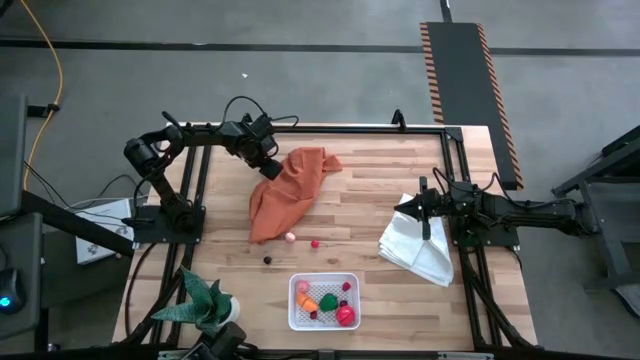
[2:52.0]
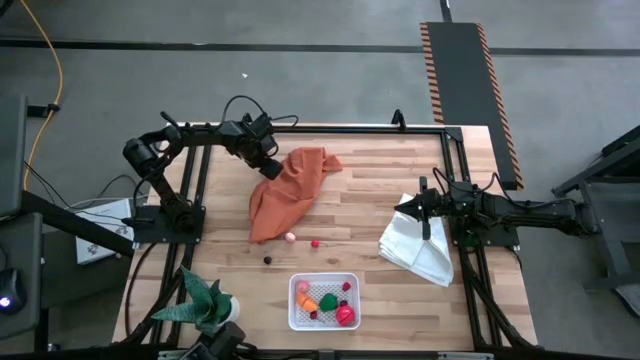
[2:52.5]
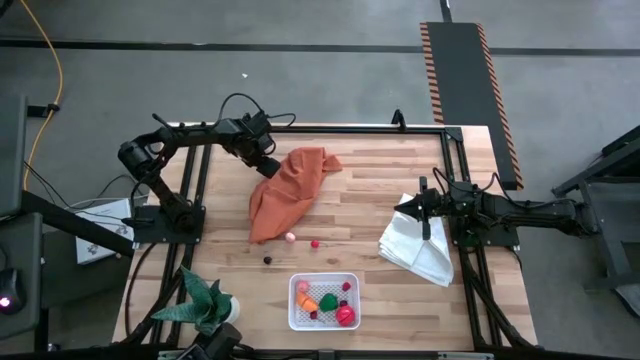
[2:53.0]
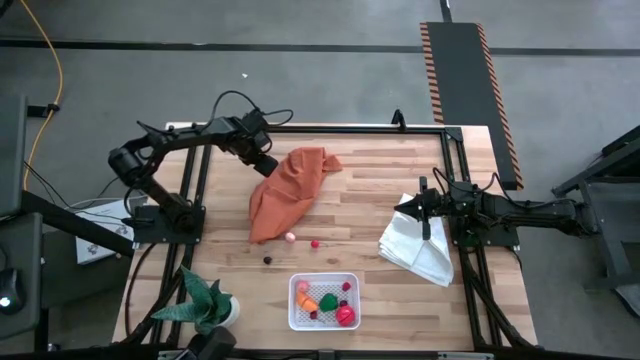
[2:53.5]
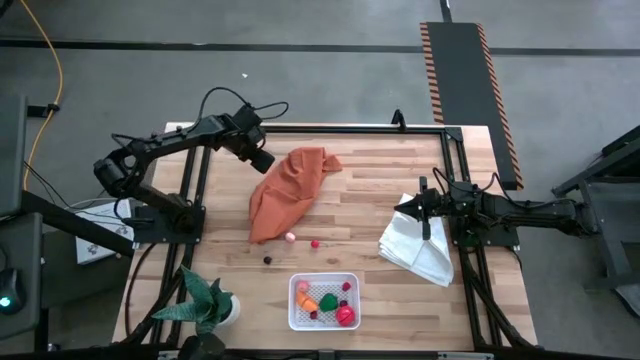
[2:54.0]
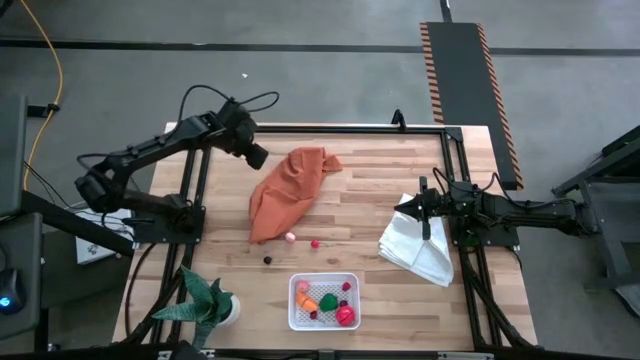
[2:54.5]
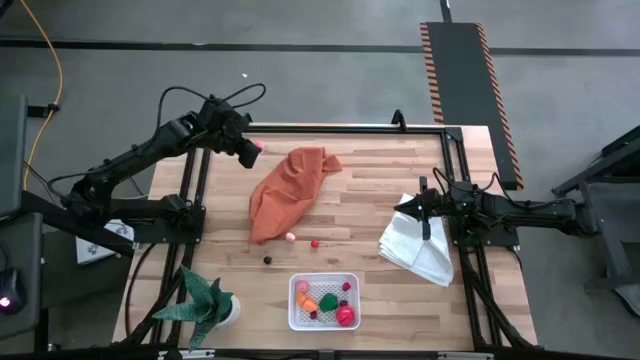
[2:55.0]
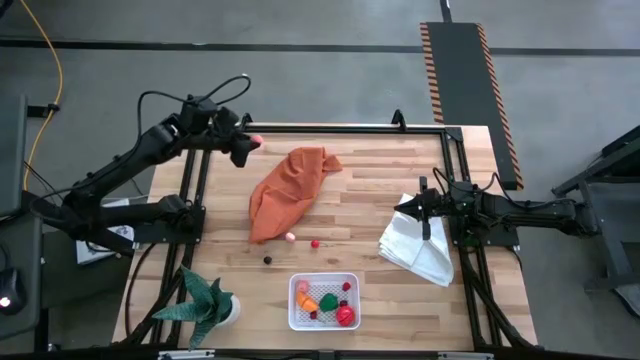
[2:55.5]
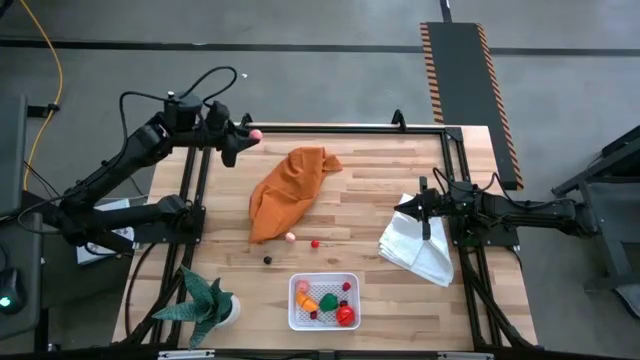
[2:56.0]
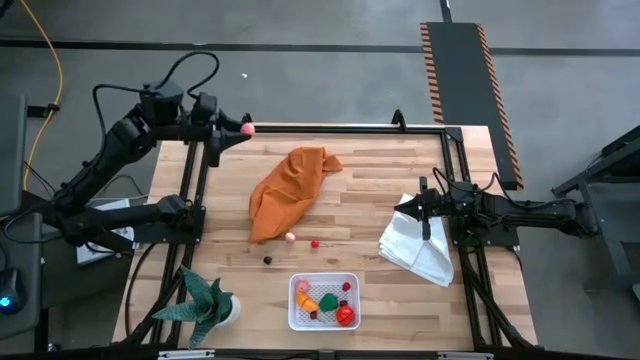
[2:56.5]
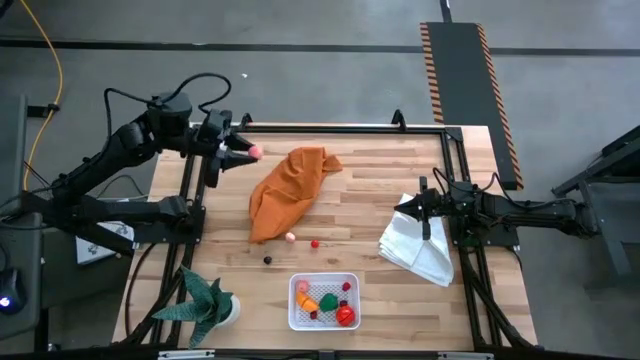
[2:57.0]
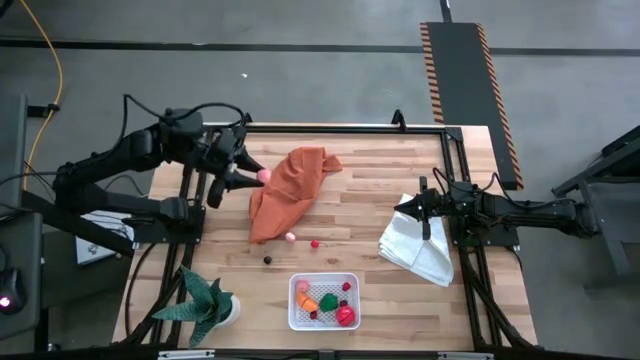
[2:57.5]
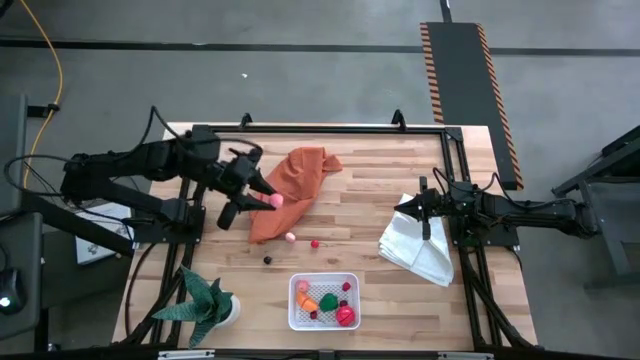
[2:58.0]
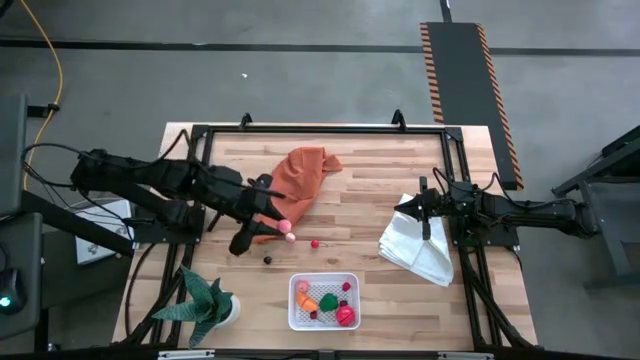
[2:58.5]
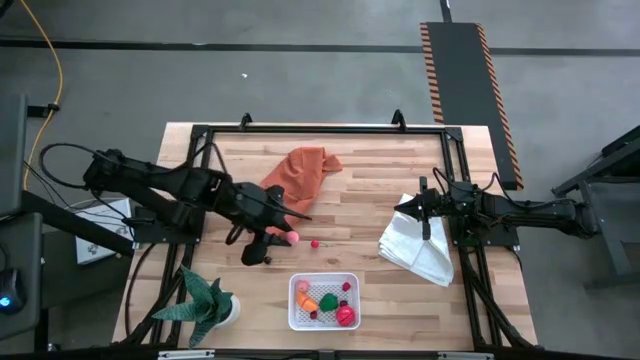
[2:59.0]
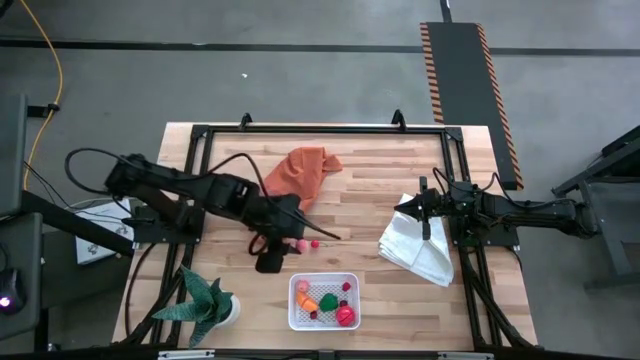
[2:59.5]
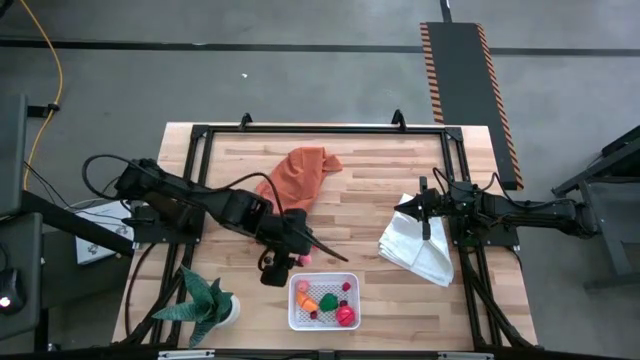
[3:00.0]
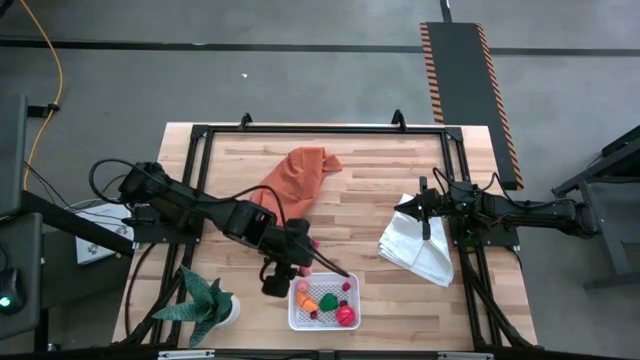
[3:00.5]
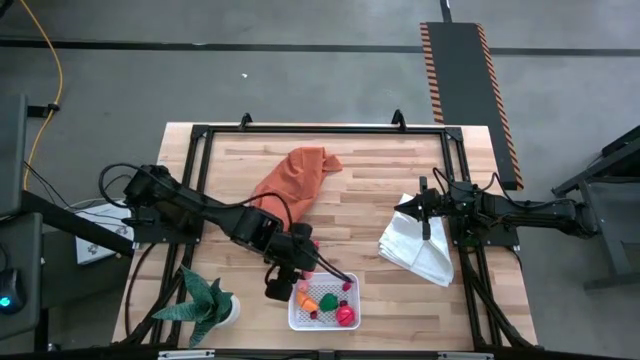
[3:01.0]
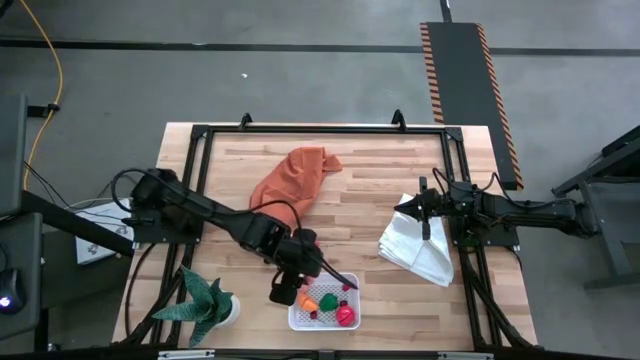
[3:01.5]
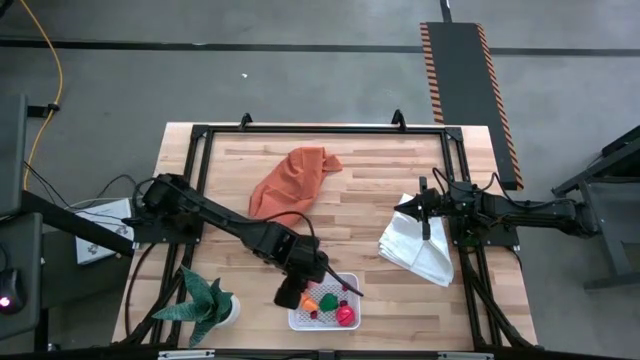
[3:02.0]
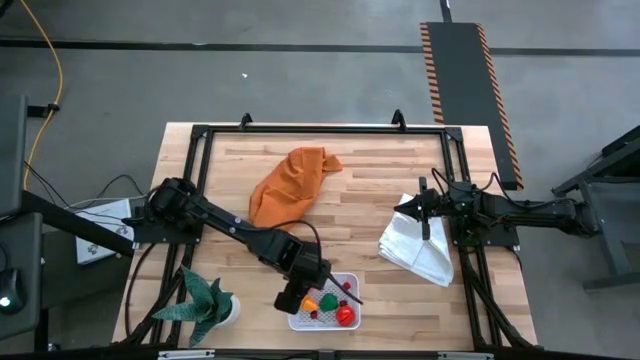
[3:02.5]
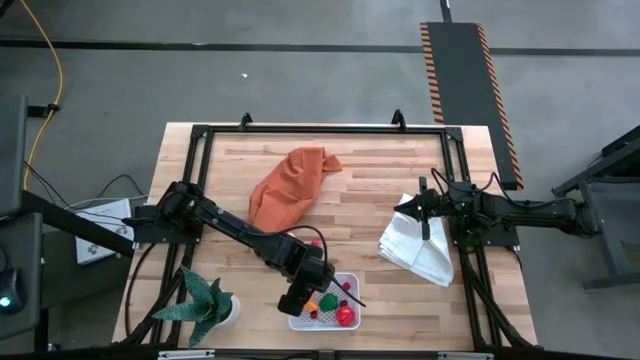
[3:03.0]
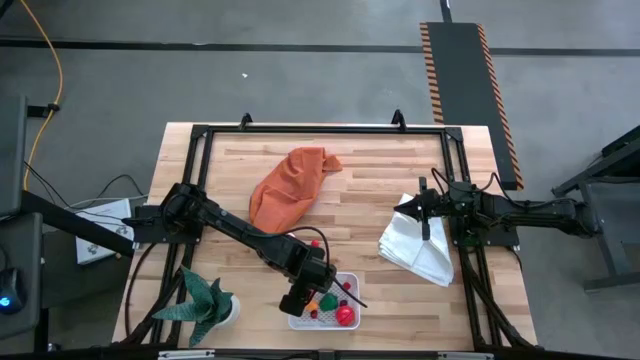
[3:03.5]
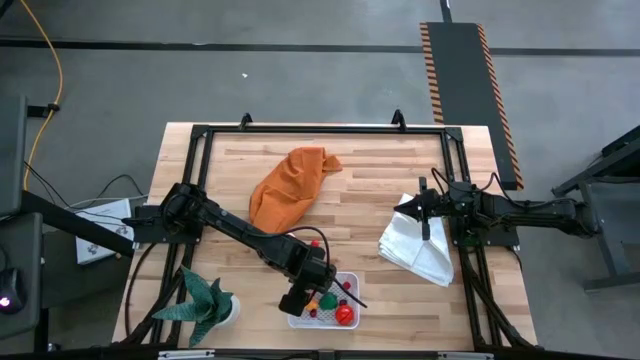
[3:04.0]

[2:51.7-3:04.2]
Task: Pick and placing Produce into tupperware
Put the top peach into the white bin

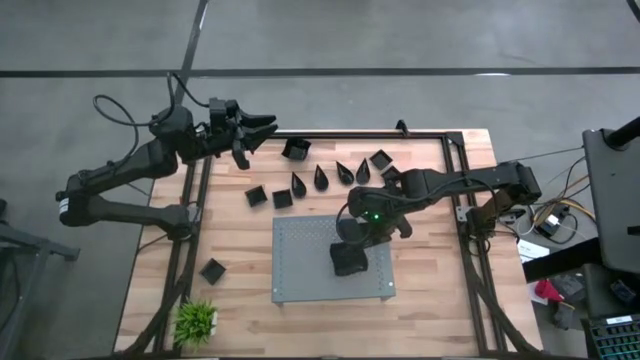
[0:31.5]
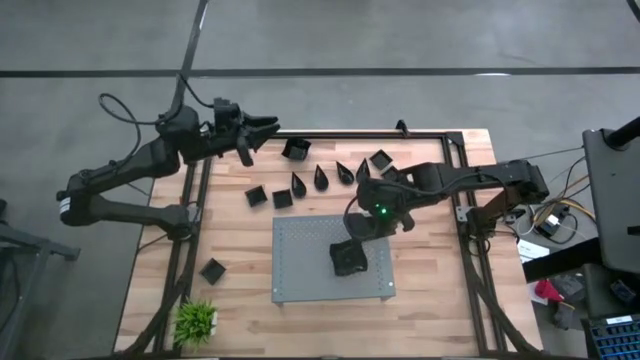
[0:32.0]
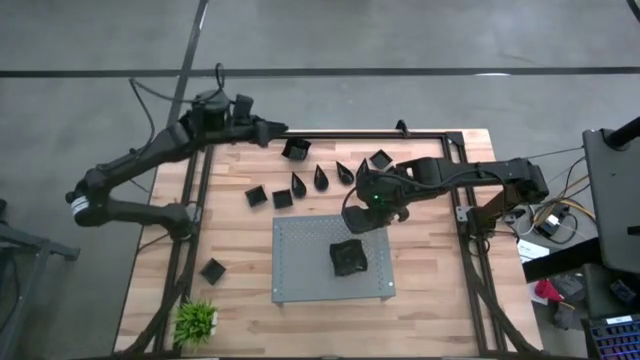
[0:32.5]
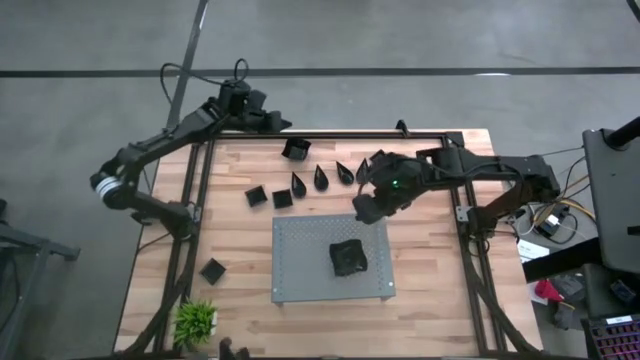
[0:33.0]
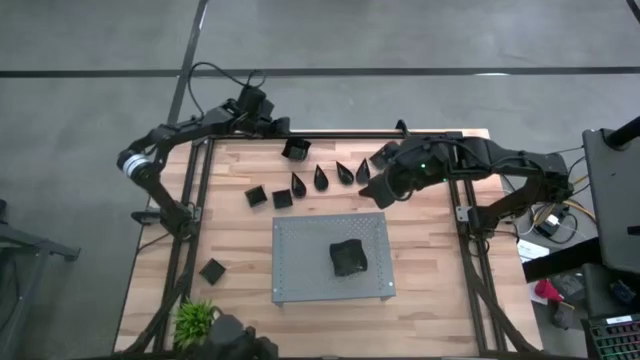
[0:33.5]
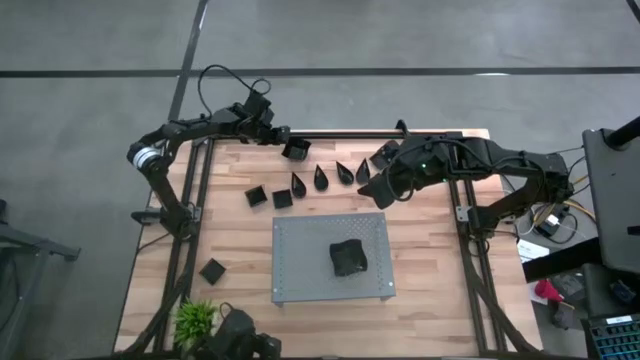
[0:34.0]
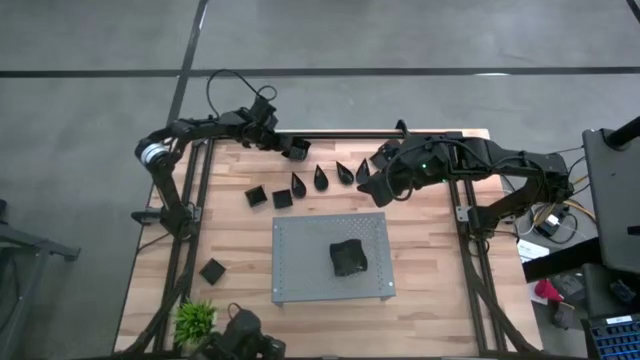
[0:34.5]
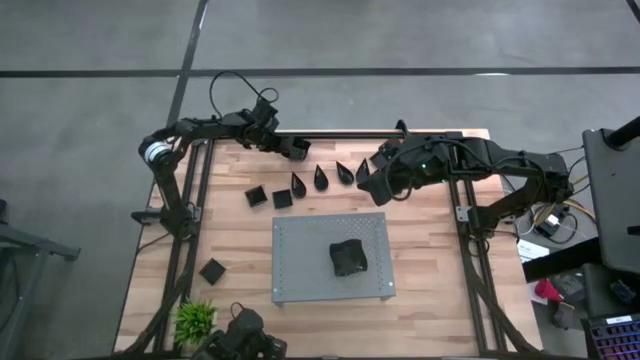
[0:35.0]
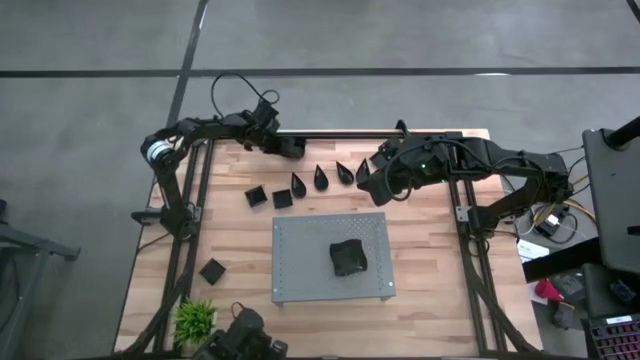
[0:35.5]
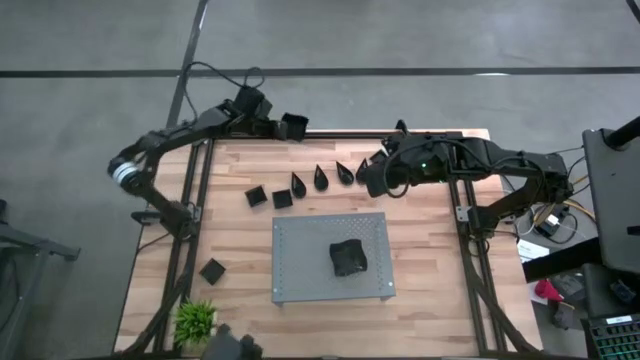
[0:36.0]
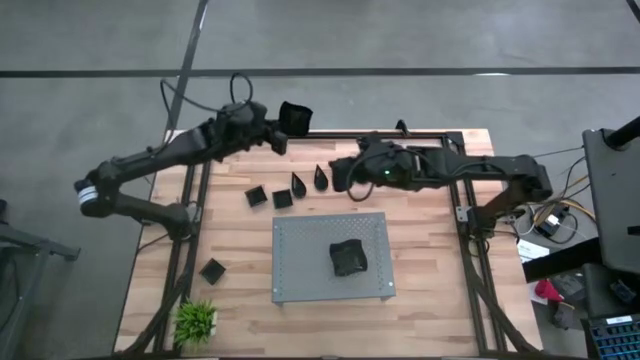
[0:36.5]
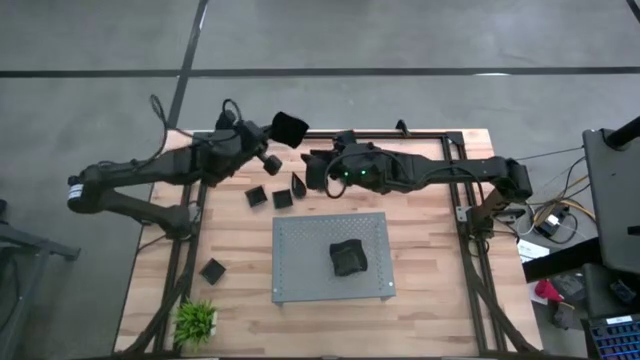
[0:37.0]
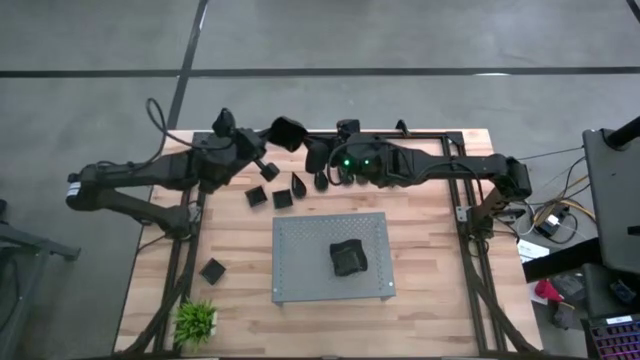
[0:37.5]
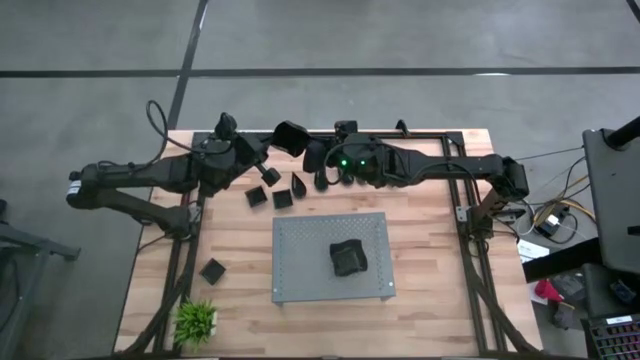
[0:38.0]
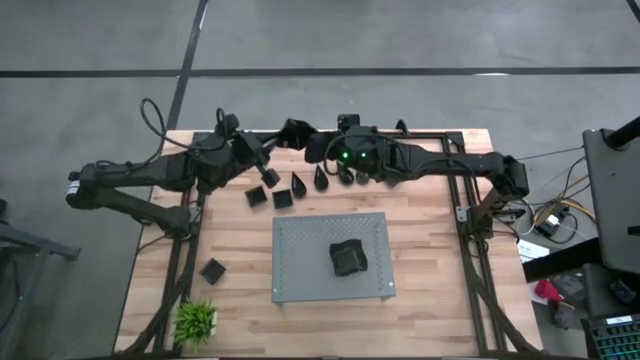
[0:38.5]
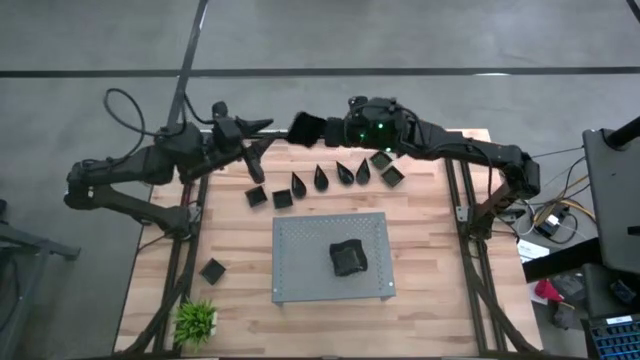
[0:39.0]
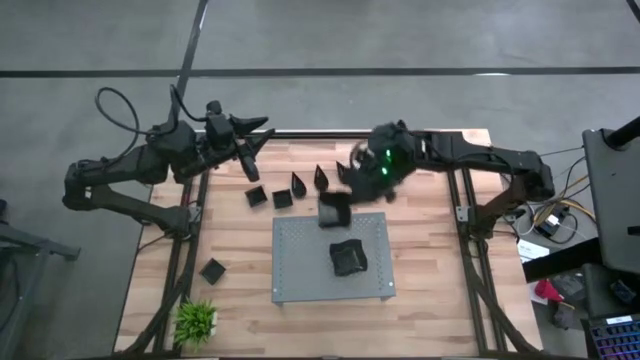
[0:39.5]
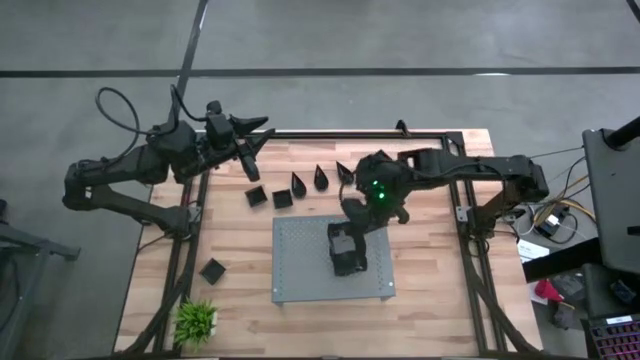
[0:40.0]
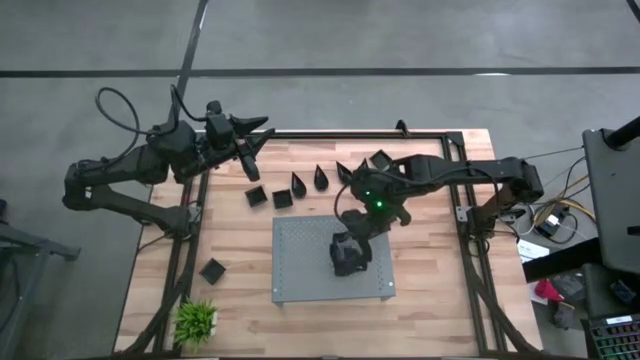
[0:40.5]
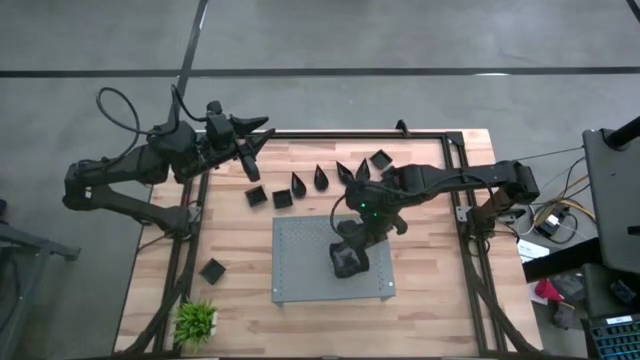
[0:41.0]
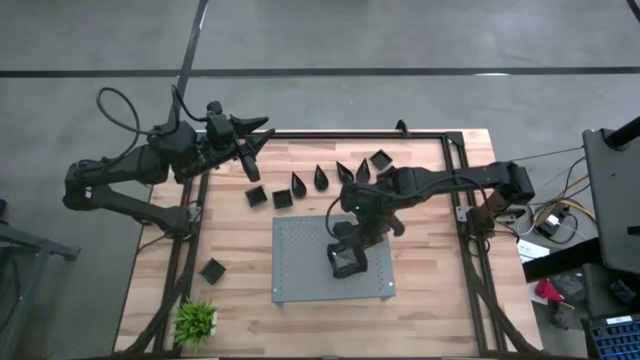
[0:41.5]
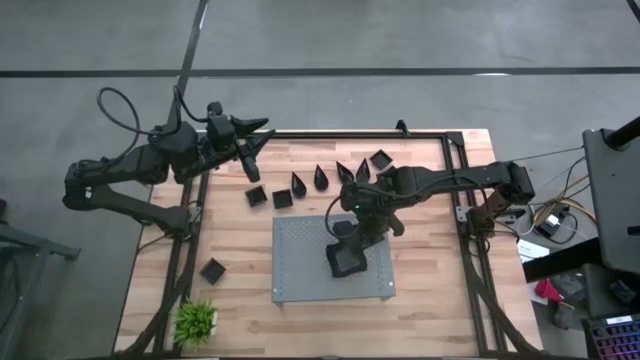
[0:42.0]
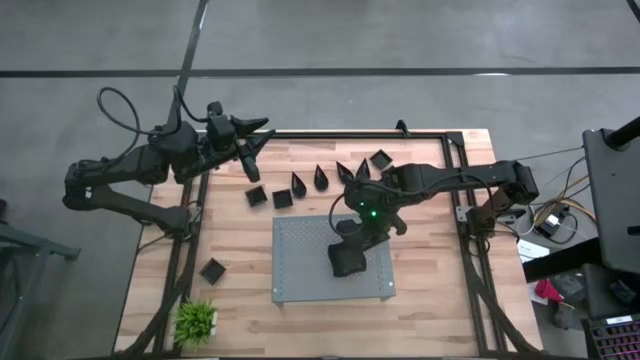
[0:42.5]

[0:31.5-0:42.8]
Task: Pick & Place Mini shaped plates
Stack the distorted square plate on top of the other distorted square plates on the shelf
